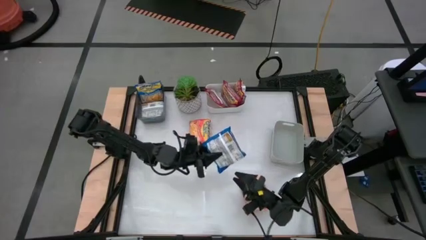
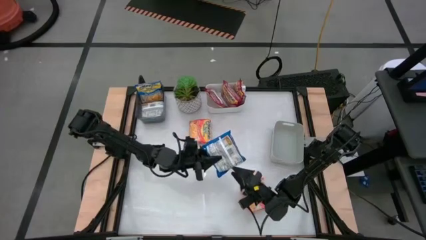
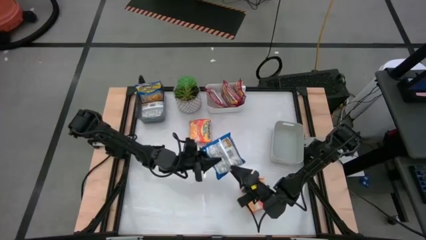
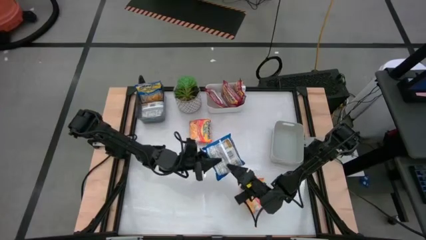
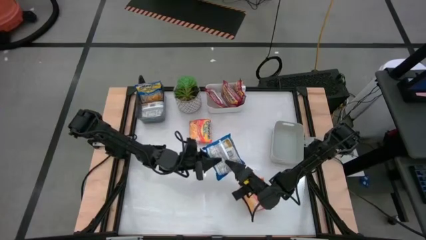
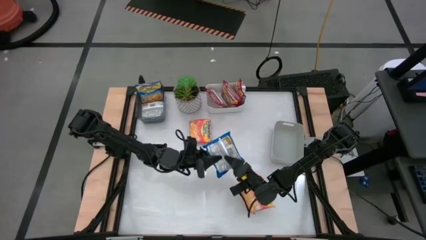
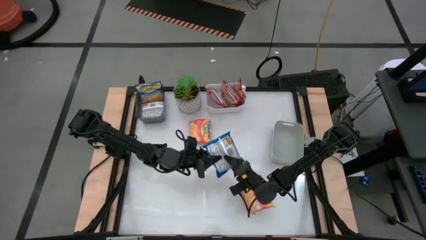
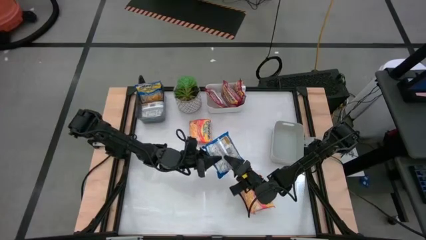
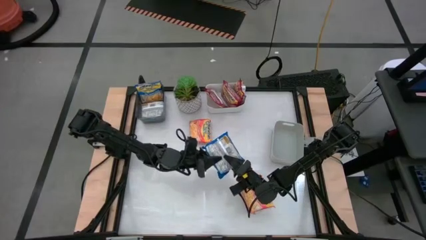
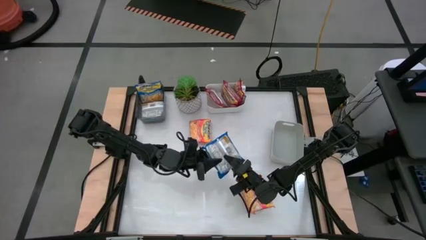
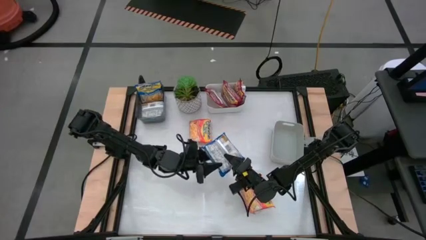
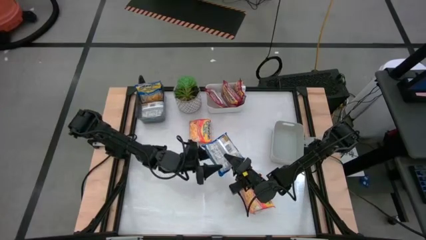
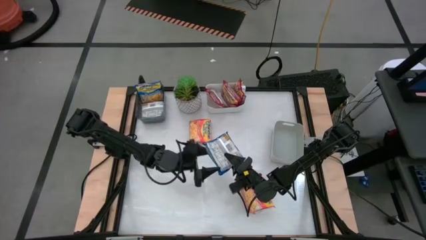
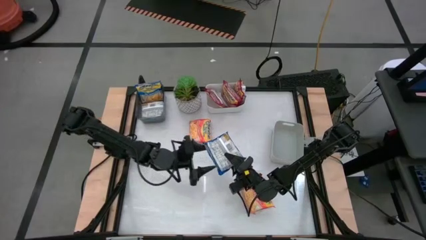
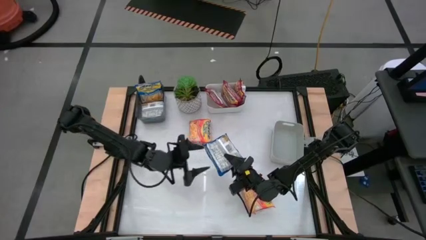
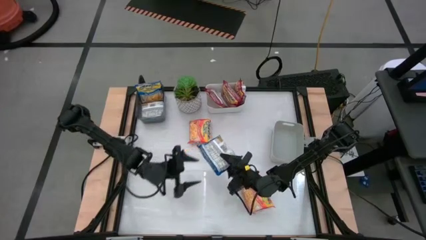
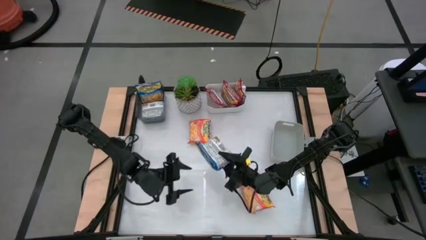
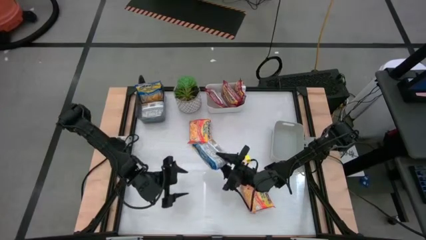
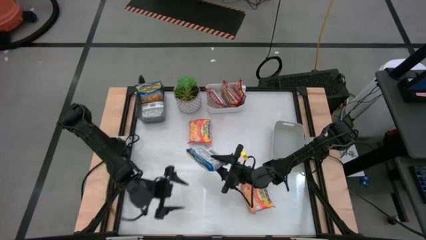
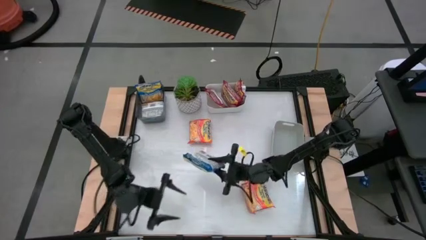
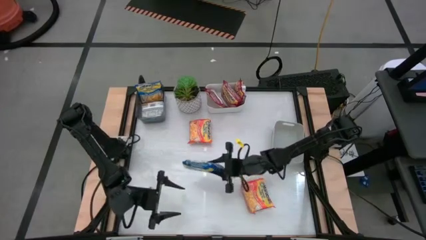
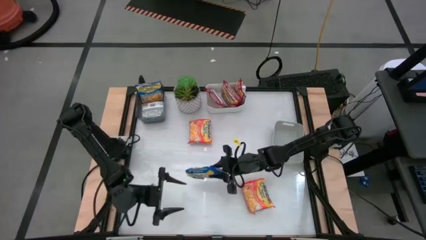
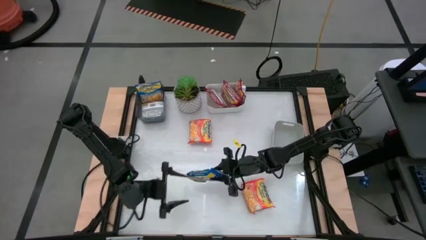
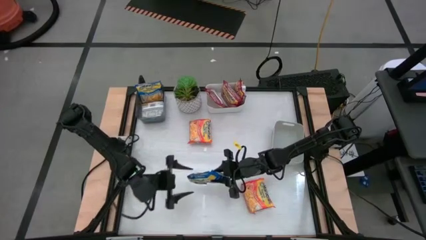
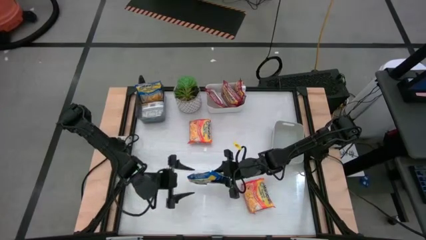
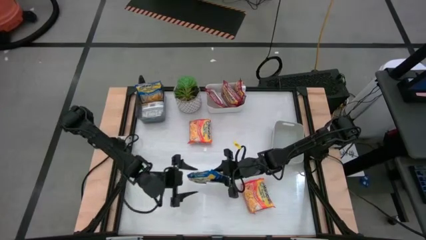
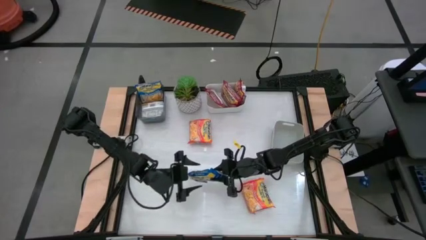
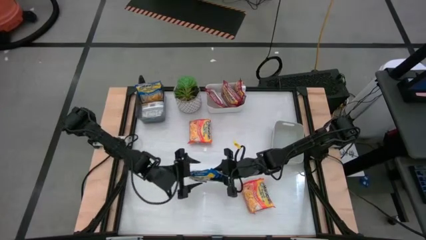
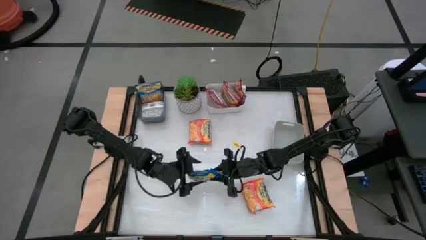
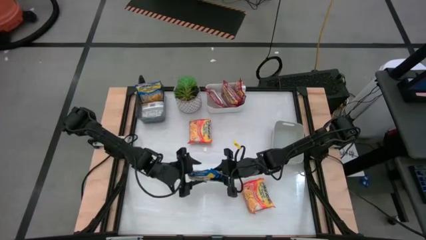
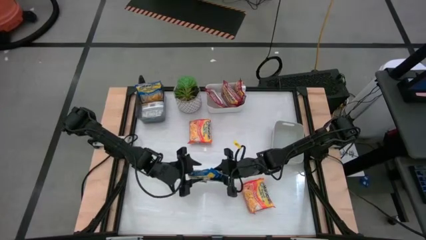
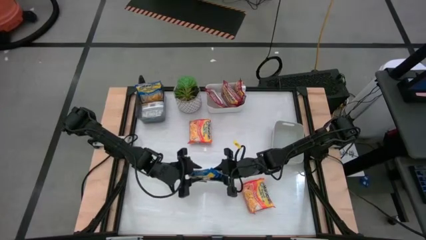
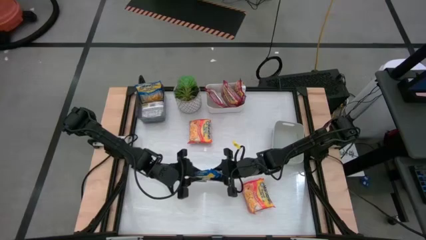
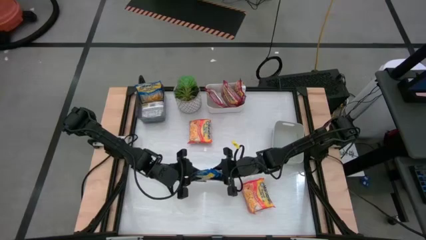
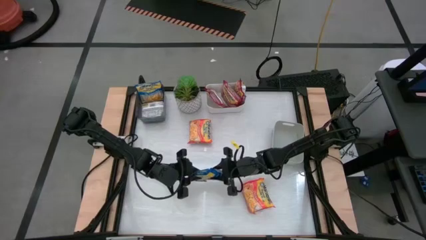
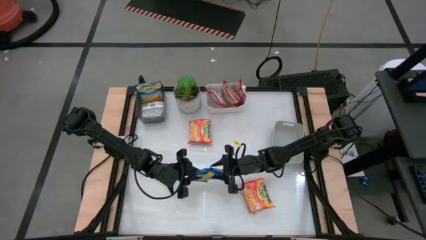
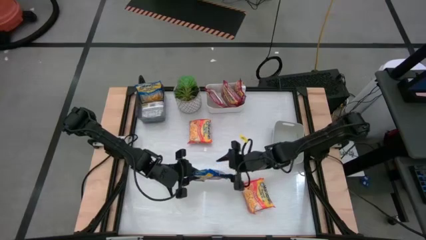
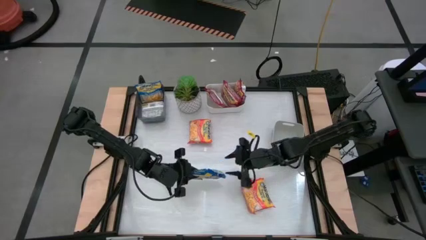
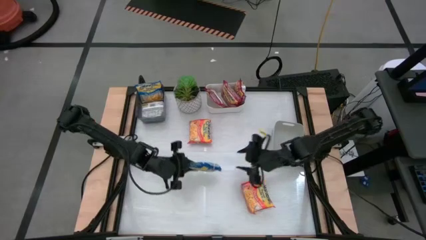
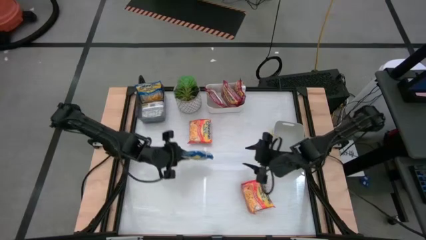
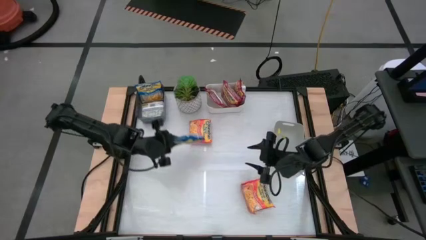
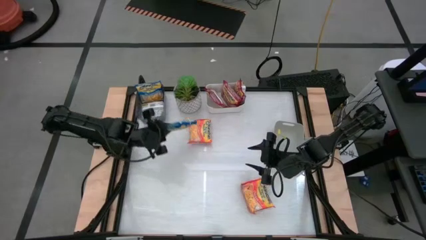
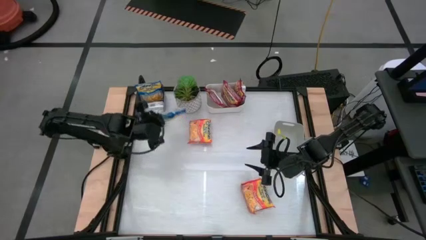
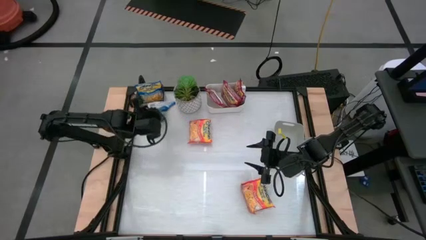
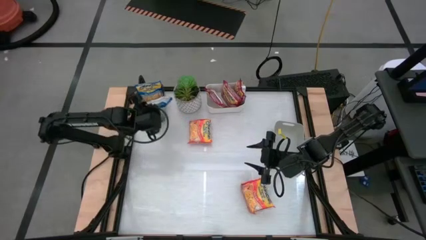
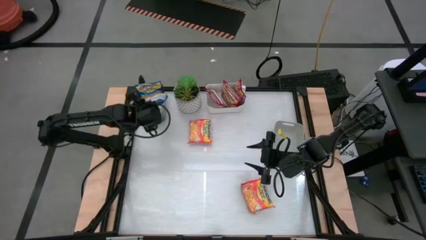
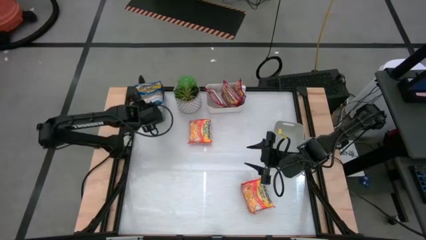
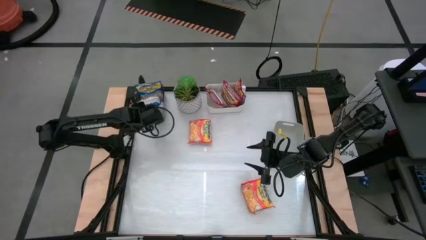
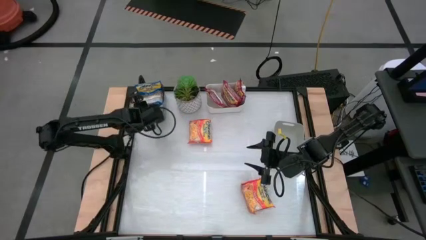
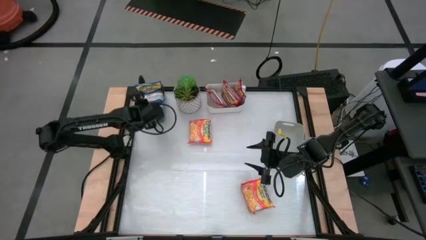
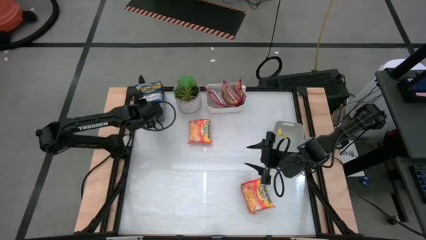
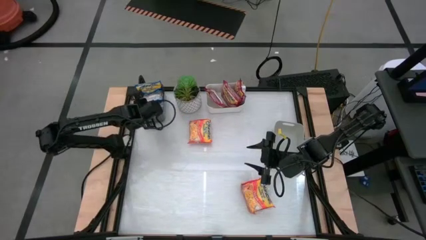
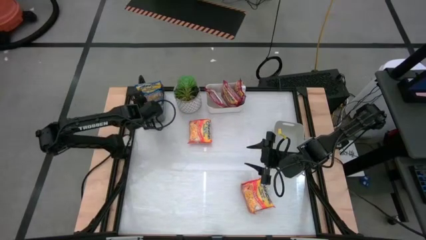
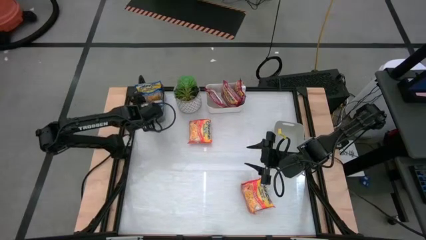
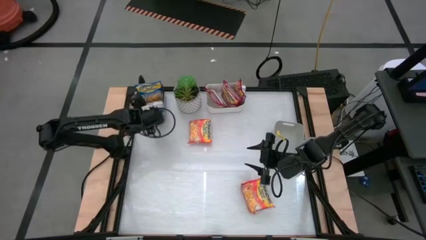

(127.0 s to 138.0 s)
Task: Sort Maruchan noodles
Put the blue noodle pack into the black bin

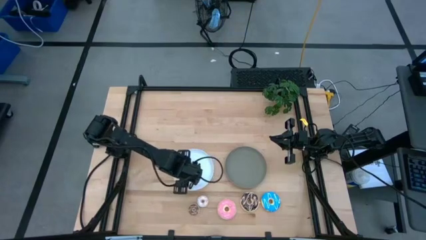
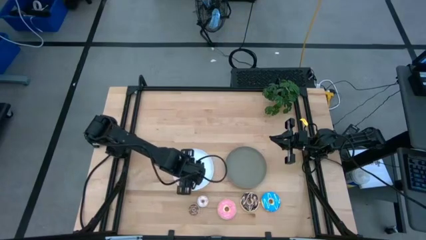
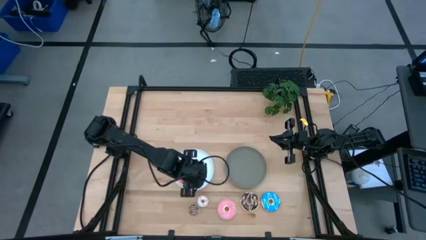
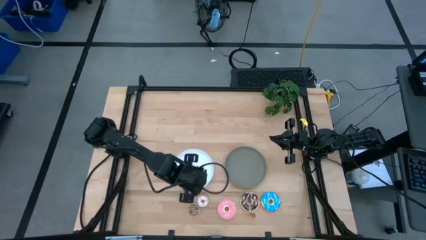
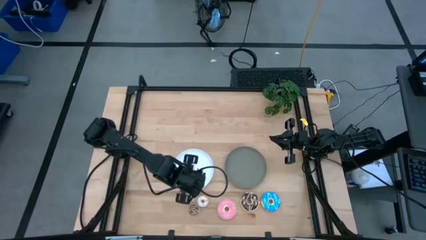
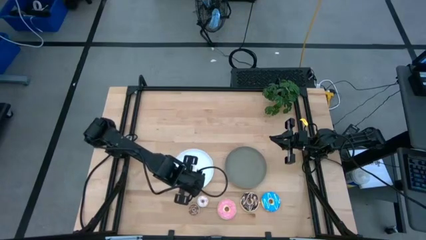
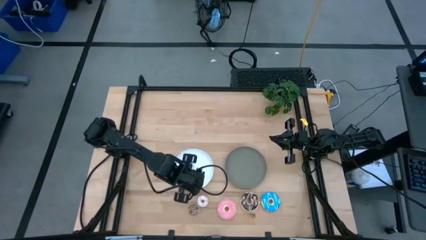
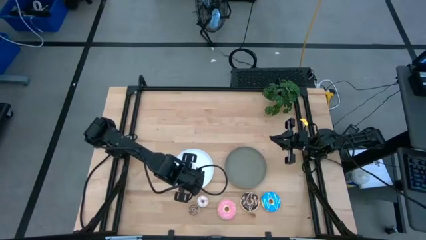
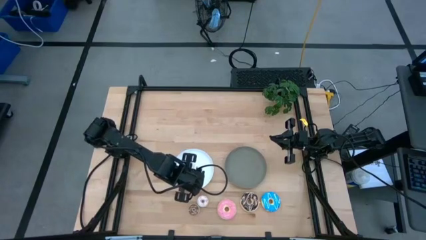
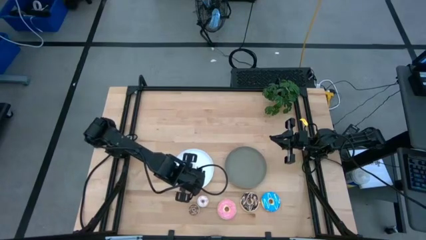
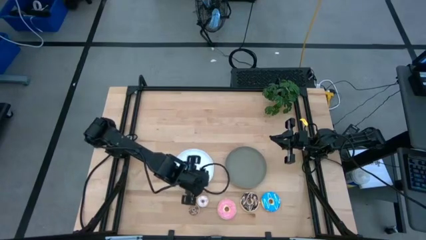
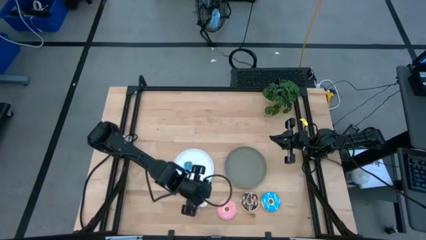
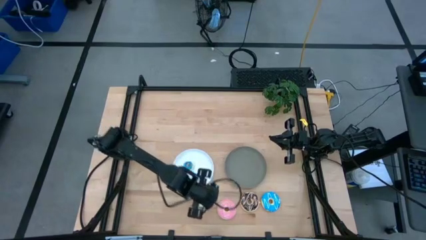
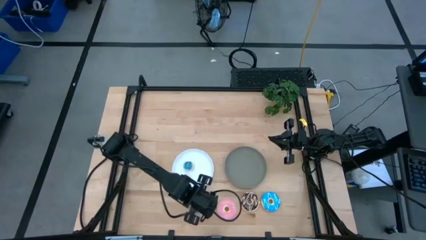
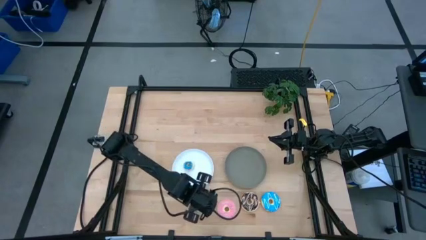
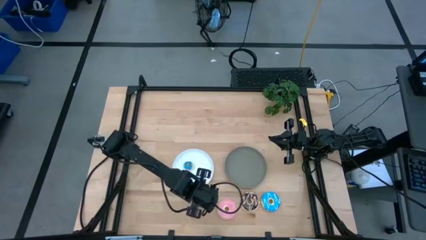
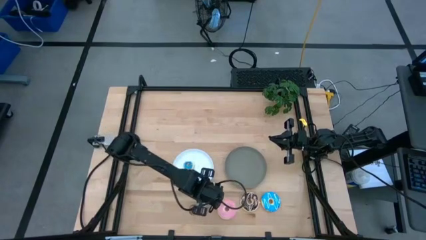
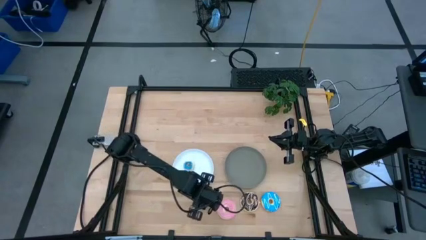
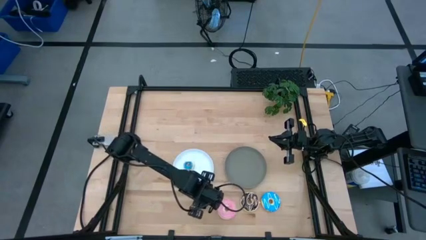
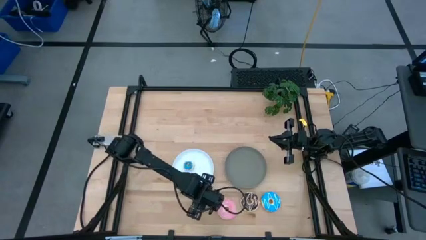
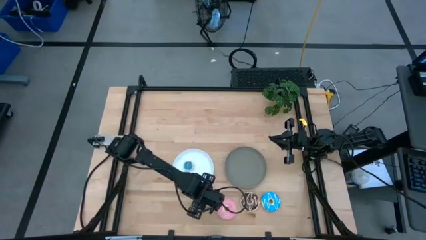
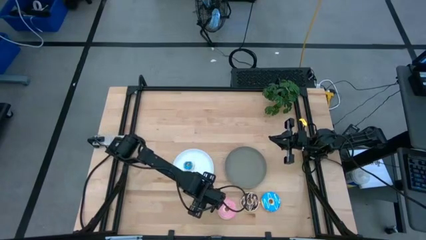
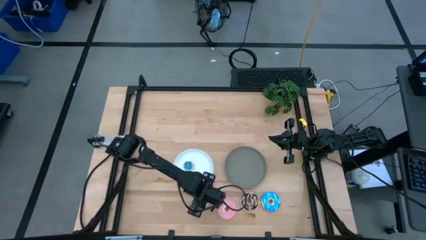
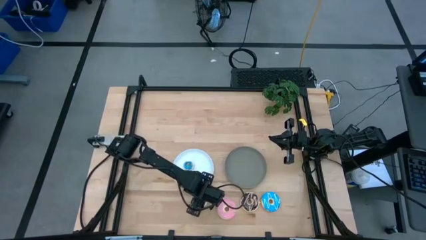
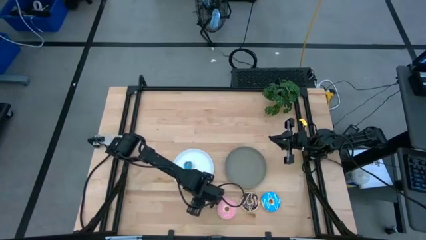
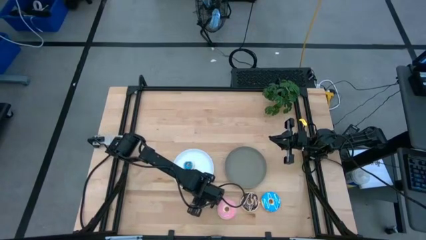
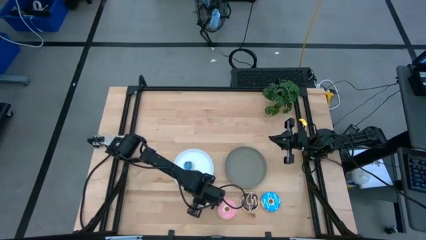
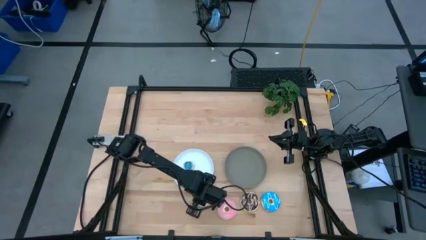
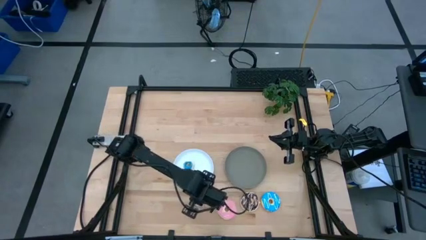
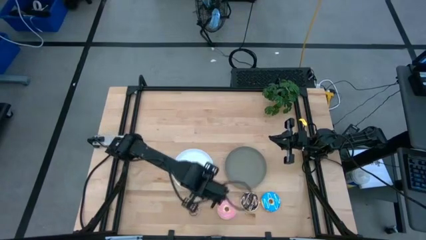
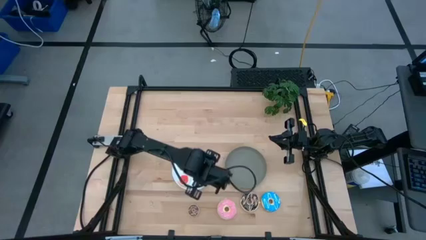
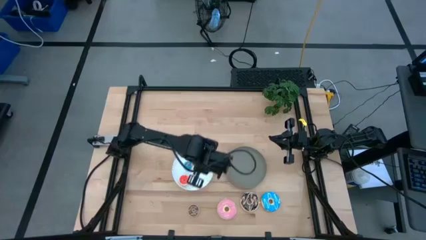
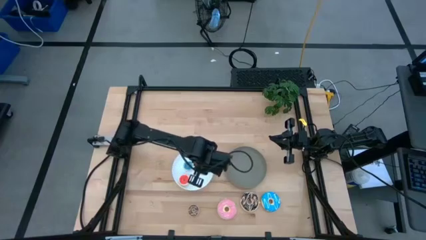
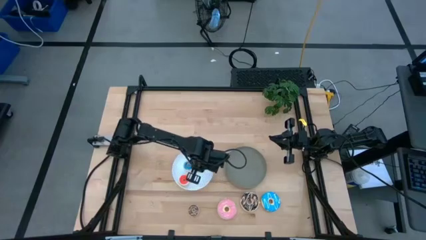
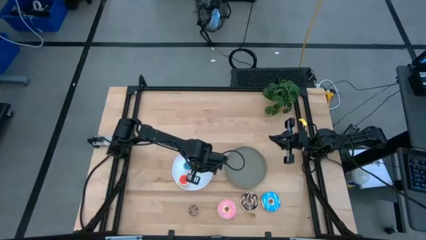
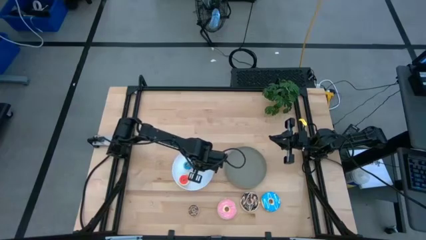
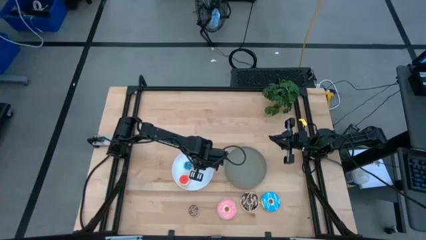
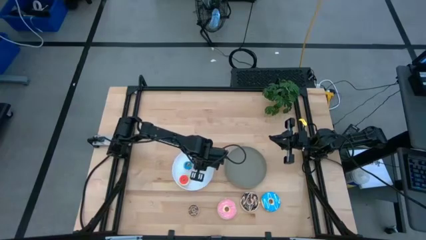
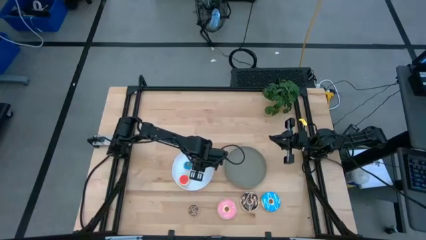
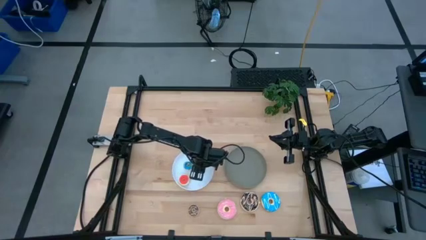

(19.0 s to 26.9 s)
Task: Pick & Place donuts
Put the small white donut on the white plate
